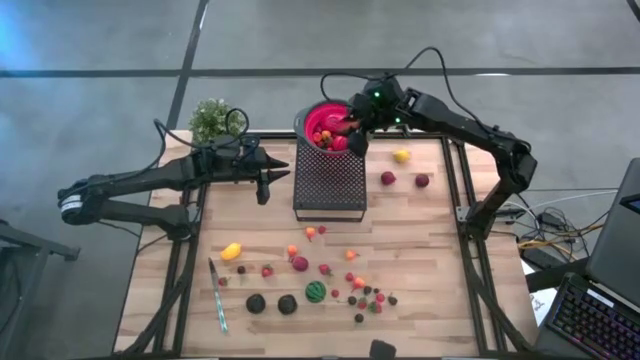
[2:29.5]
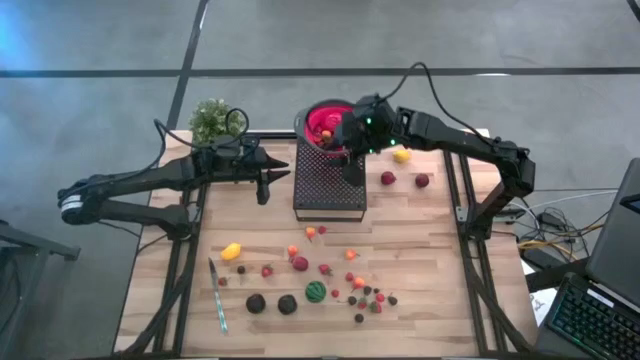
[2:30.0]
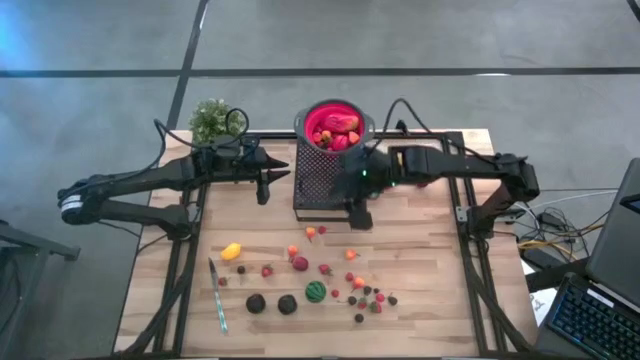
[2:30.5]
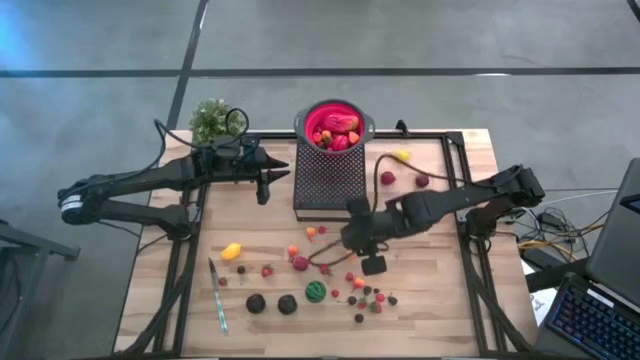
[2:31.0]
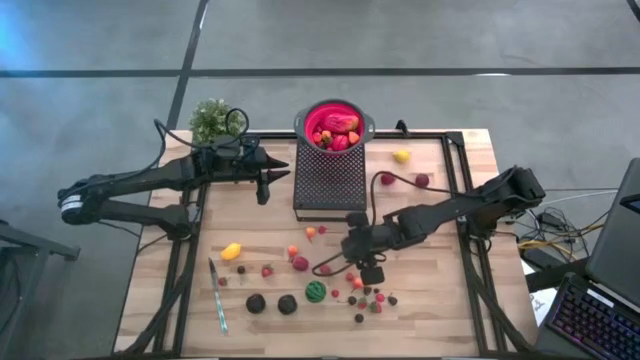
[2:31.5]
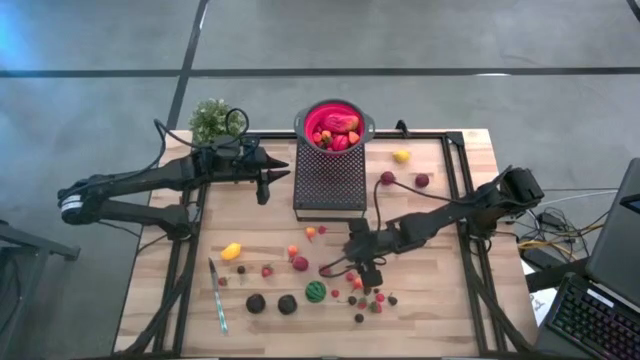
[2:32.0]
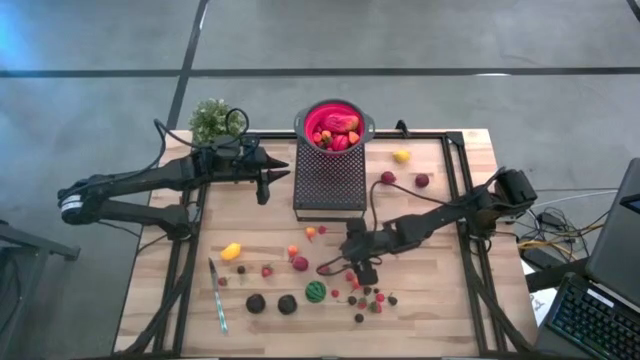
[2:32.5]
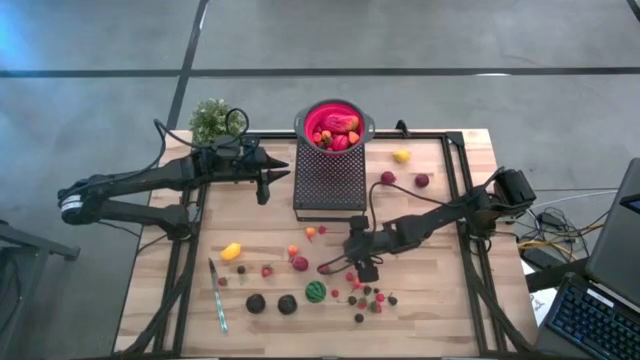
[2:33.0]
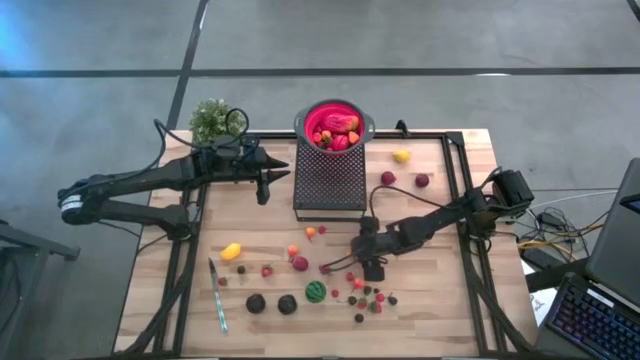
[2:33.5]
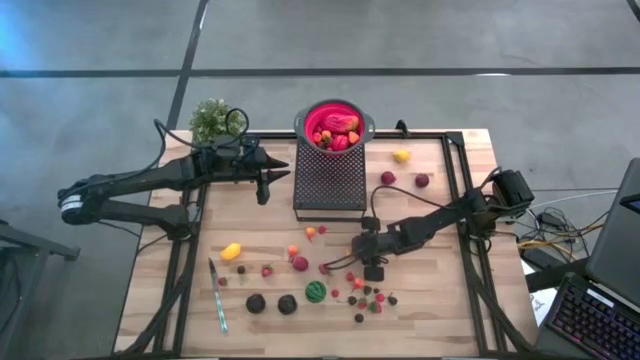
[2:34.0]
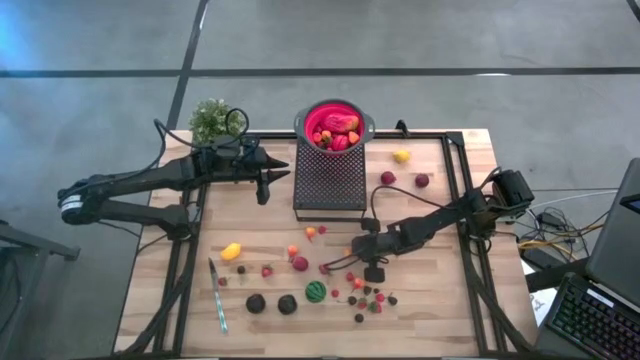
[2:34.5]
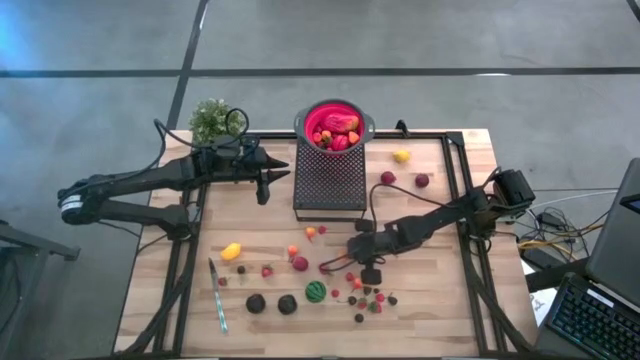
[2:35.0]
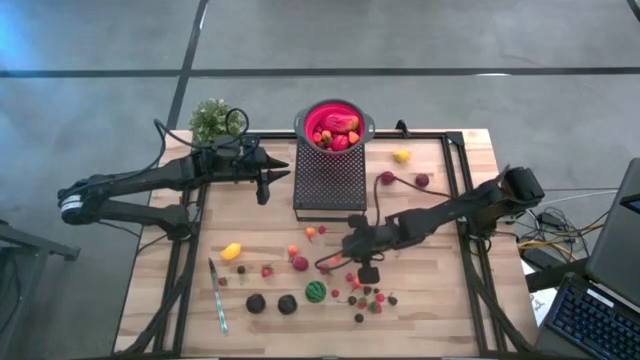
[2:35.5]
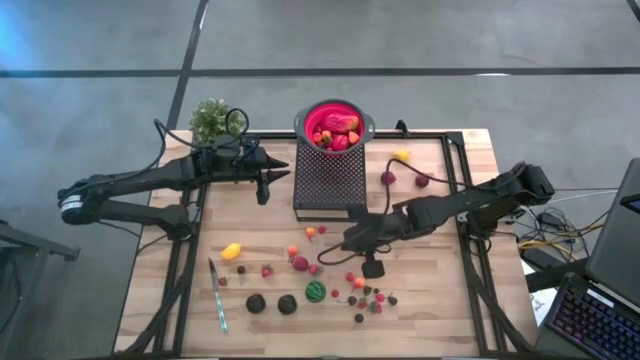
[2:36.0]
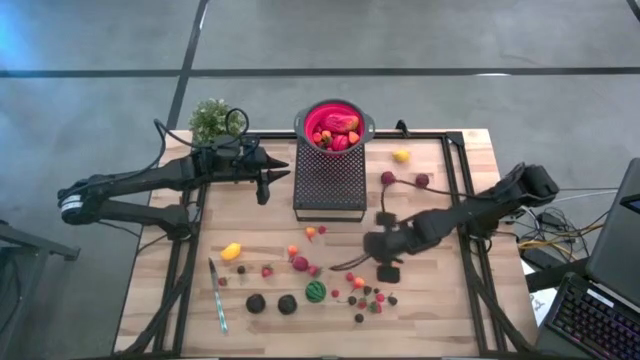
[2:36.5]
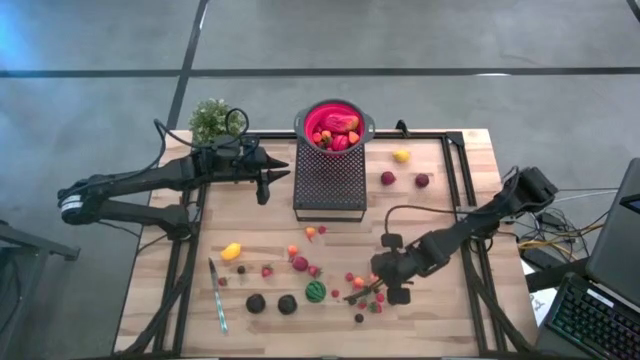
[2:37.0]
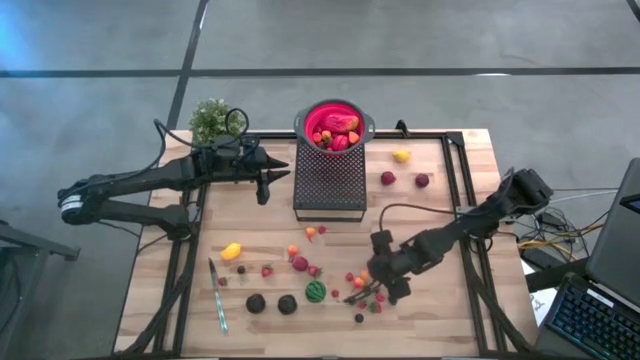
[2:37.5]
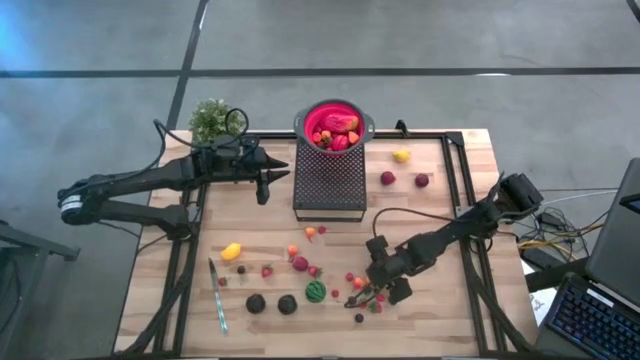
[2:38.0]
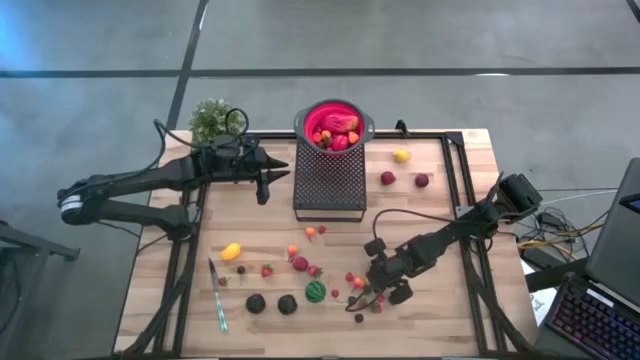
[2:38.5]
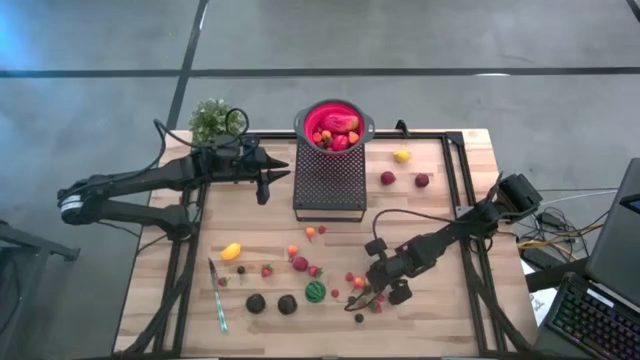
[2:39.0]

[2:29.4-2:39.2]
Task: Pick & Place Fruit
Put the pear into the red strainer bowl on the shelf

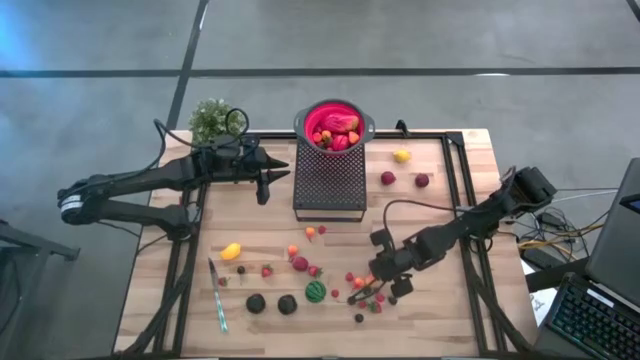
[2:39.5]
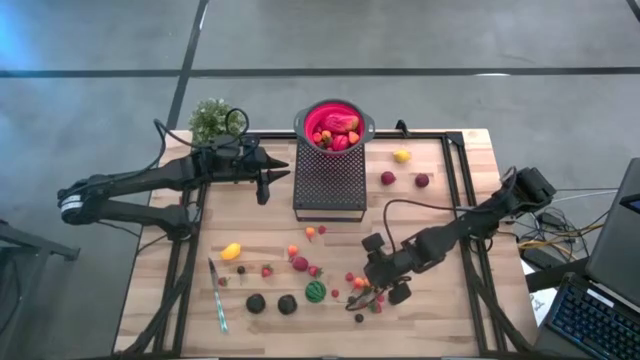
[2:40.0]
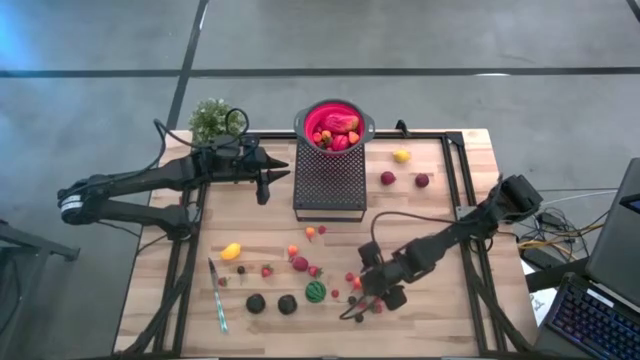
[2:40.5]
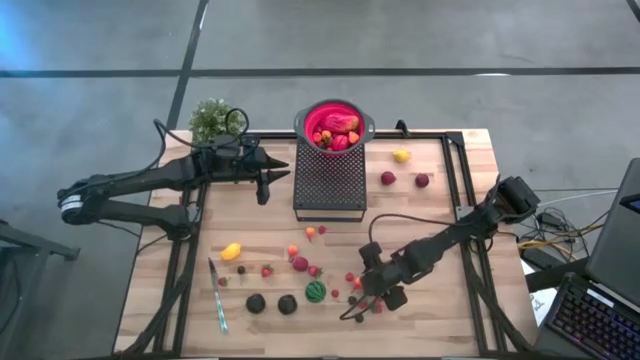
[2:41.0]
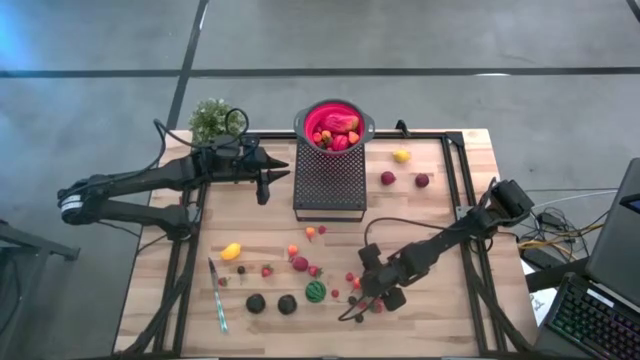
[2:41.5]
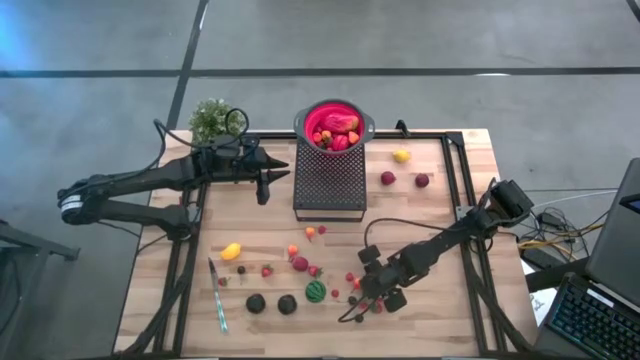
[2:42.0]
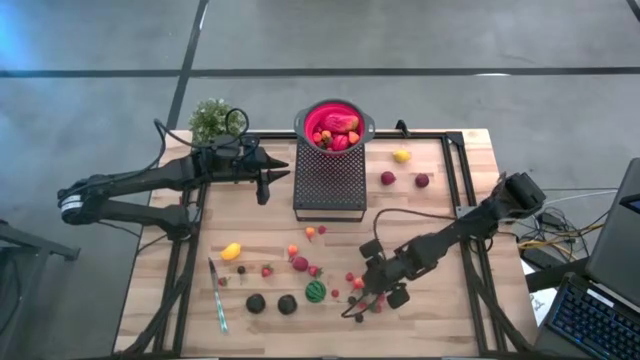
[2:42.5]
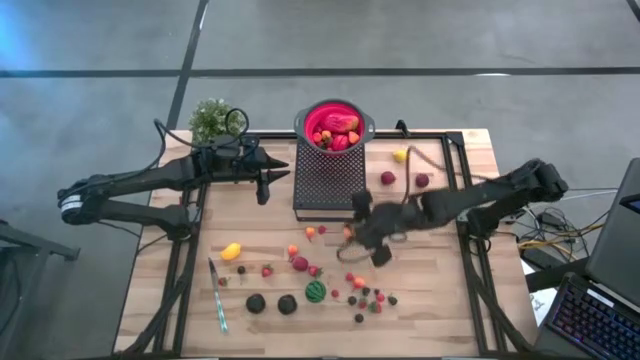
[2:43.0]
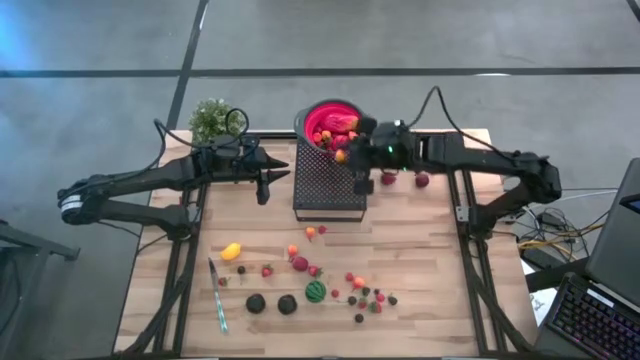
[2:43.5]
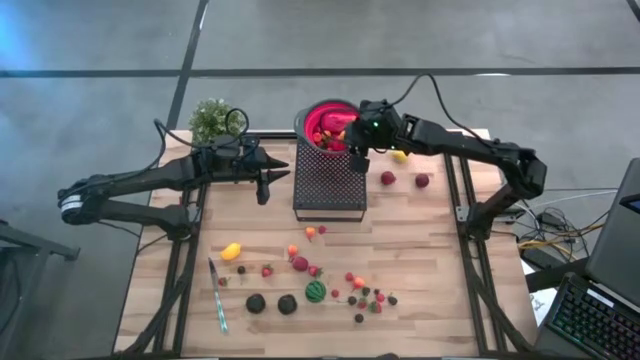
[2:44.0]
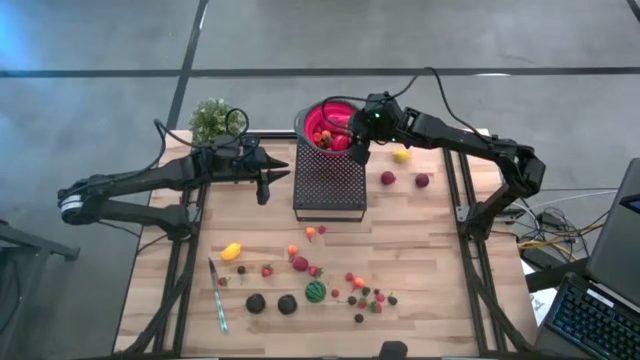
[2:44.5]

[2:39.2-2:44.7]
Put the pear into the red strainer bowl on the shelf

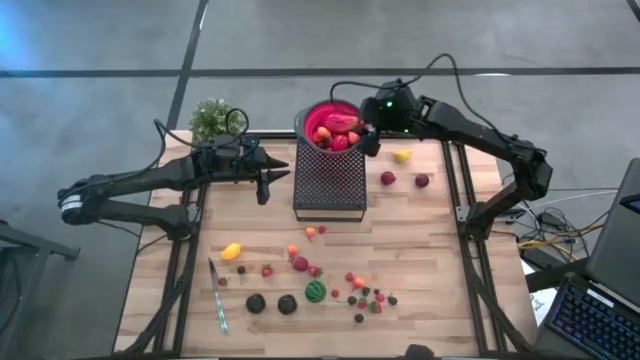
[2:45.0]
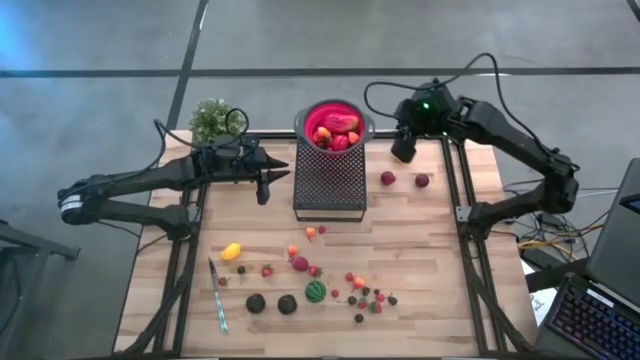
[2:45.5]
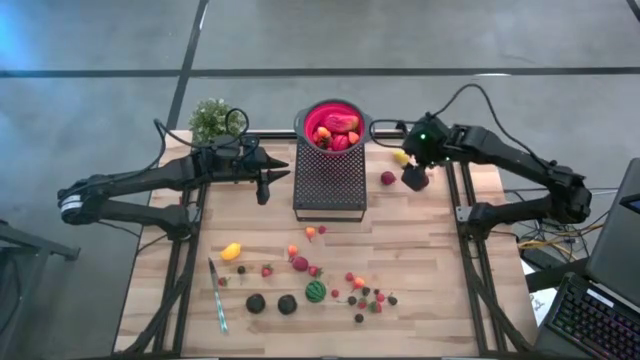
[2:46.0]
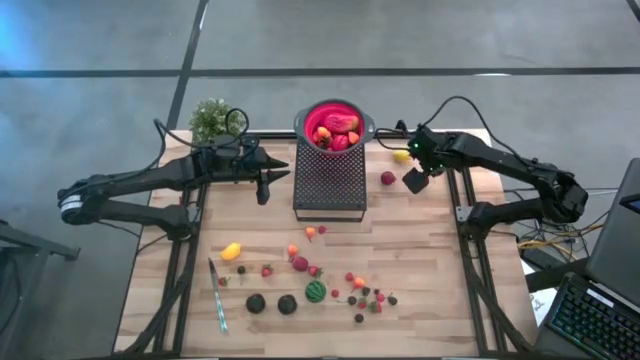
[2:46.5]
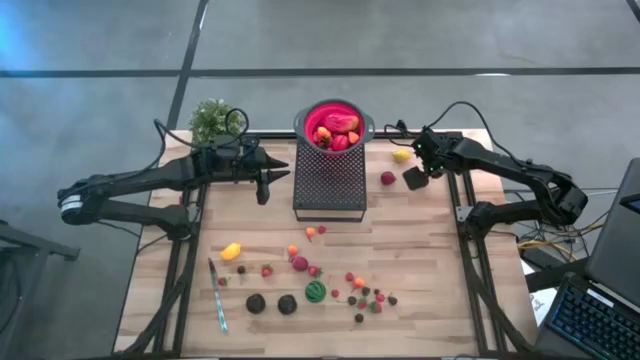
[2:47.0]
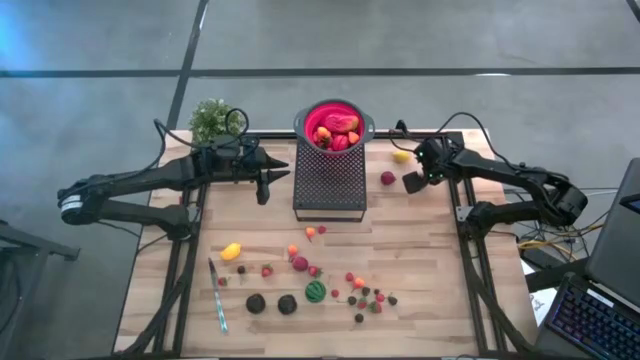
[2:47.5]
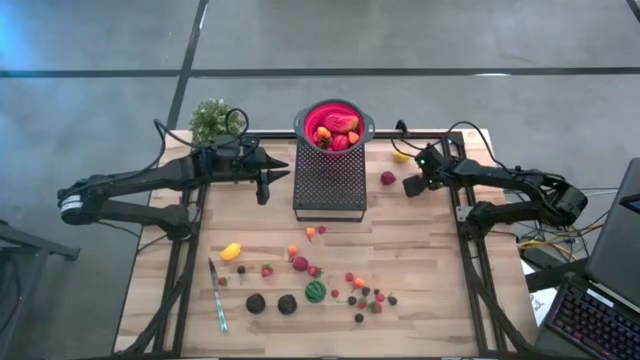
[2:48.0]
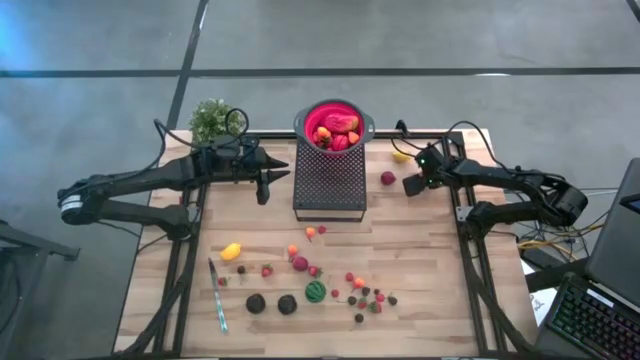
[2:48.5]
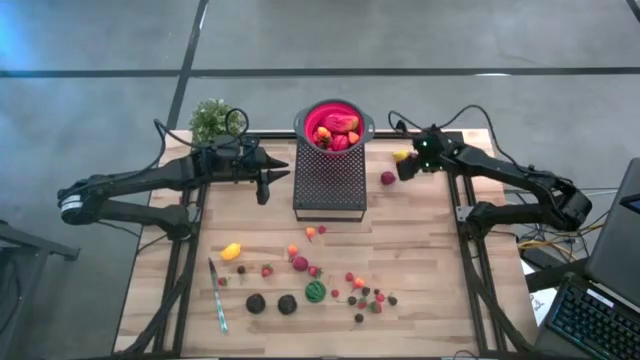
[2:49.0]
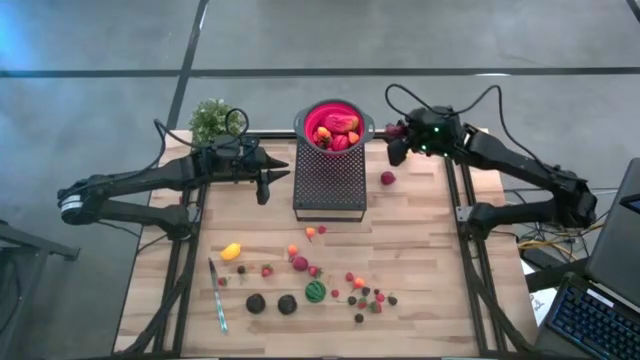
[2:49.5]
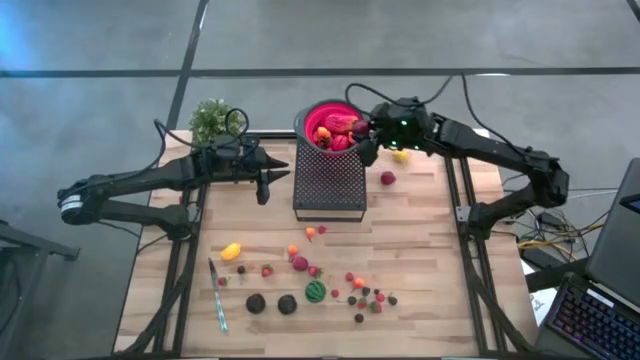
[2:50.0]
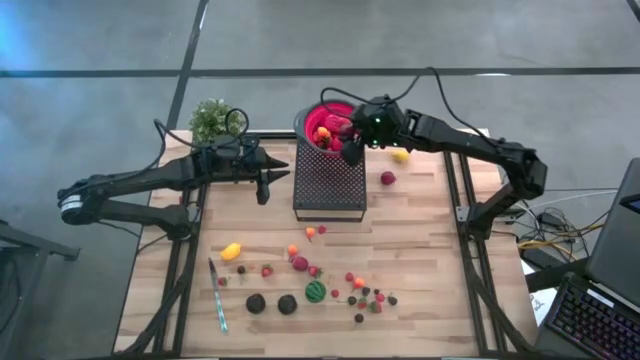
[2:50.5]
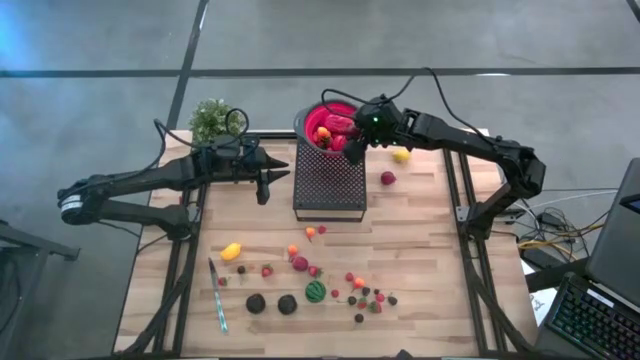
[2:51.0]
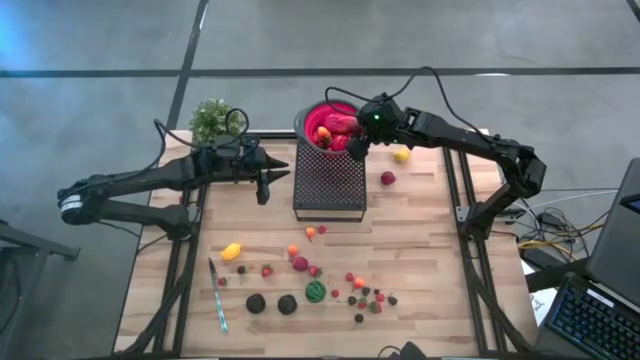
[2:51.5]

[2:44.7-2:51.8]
Put the pomegranate into the red strainer bowl on the shelf
